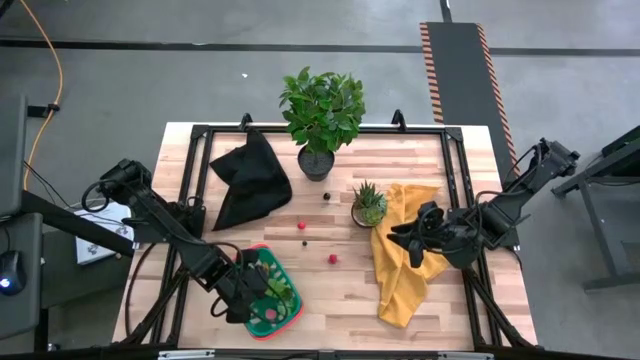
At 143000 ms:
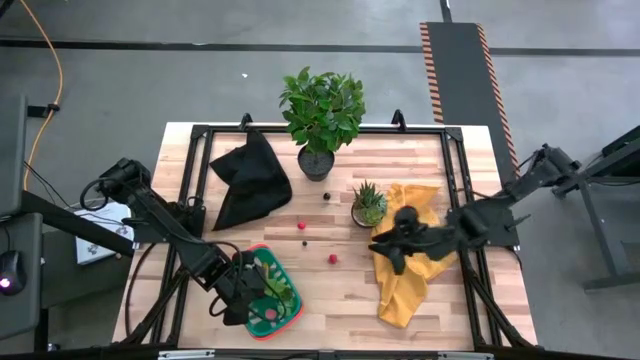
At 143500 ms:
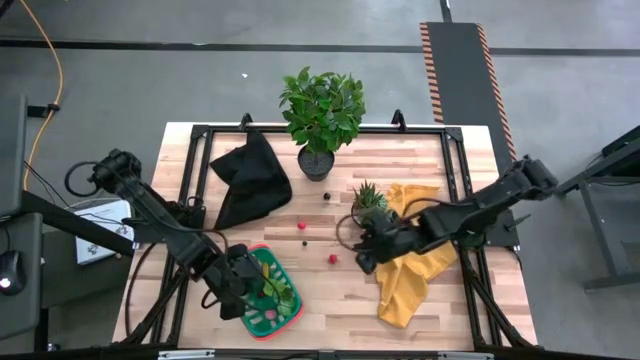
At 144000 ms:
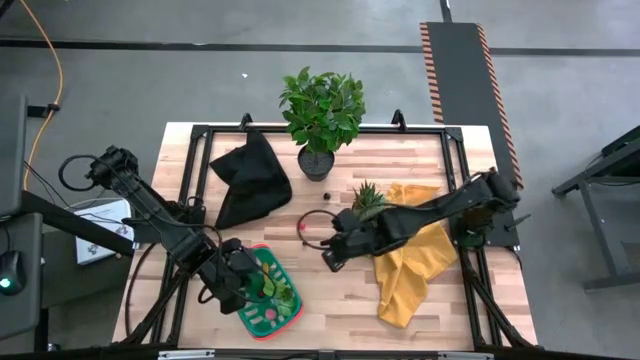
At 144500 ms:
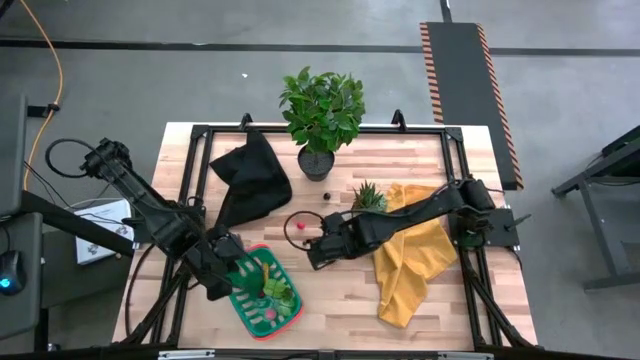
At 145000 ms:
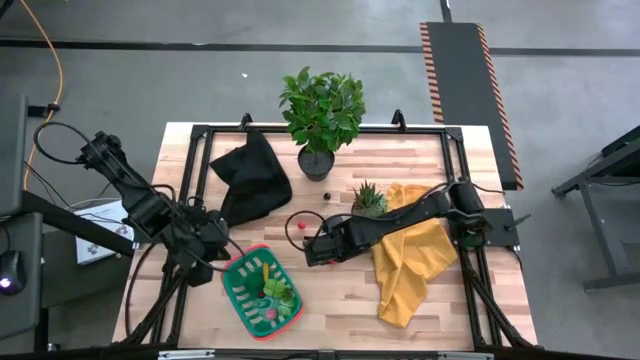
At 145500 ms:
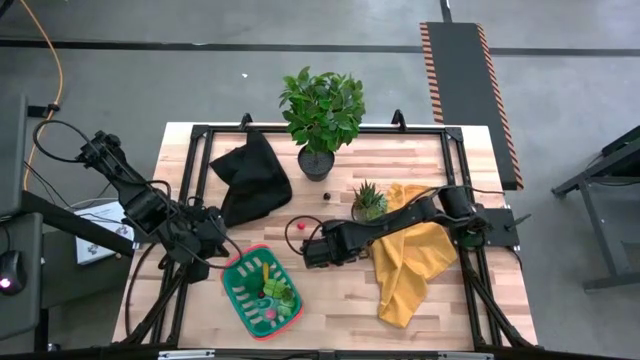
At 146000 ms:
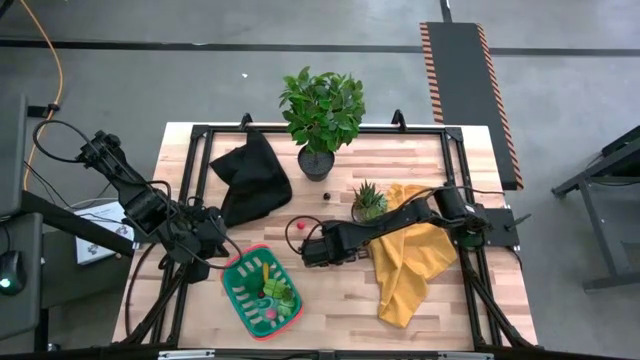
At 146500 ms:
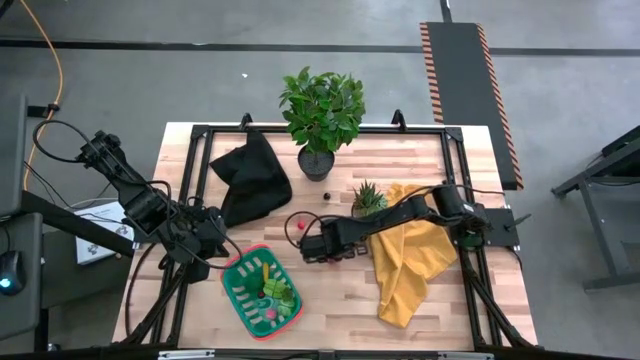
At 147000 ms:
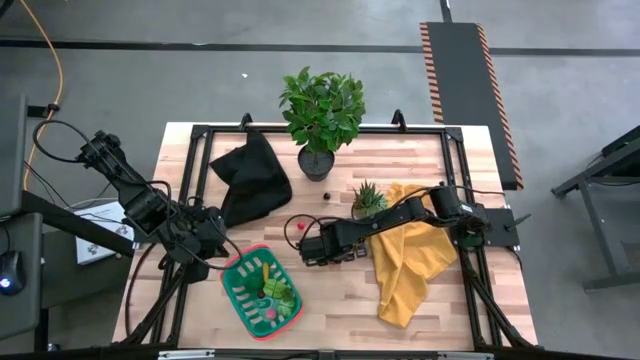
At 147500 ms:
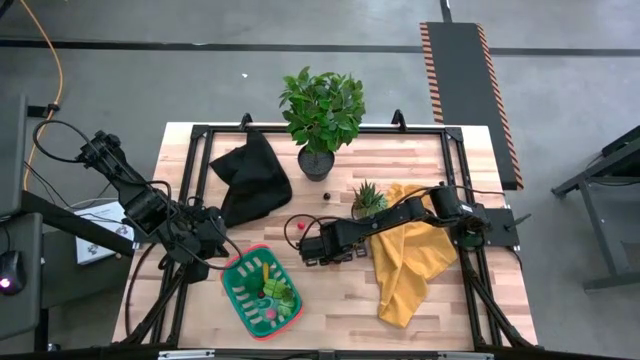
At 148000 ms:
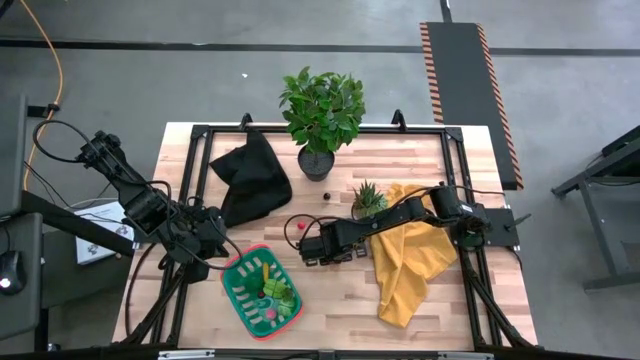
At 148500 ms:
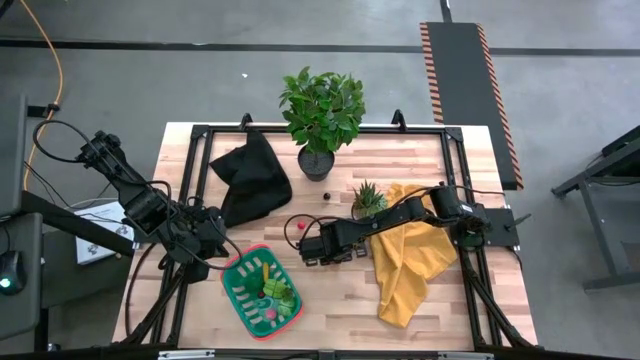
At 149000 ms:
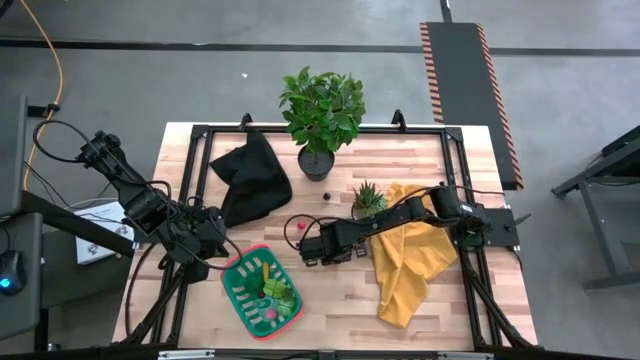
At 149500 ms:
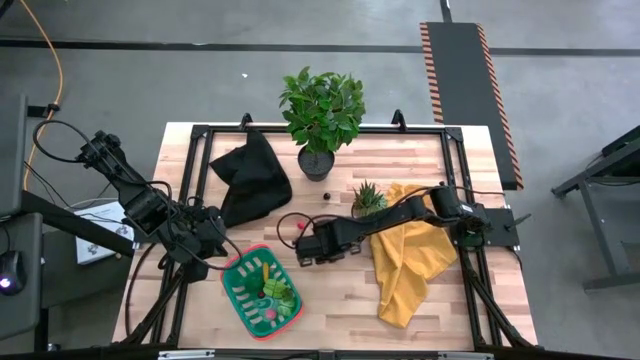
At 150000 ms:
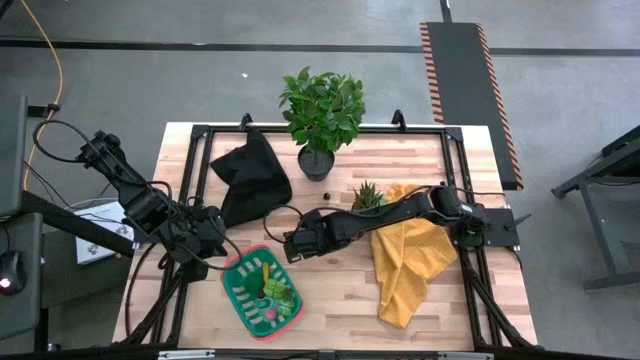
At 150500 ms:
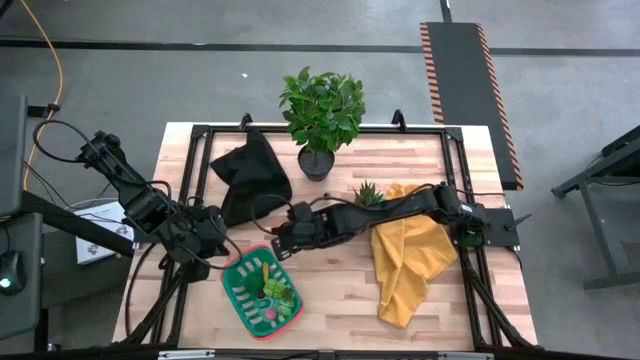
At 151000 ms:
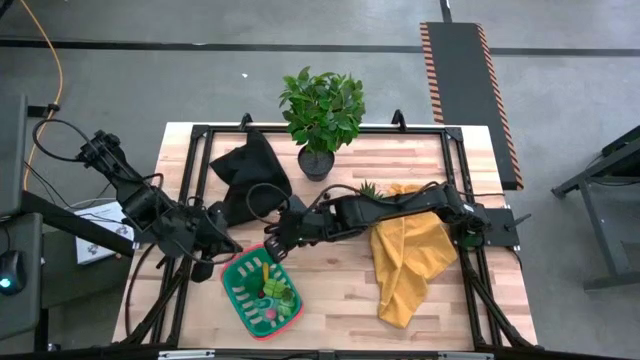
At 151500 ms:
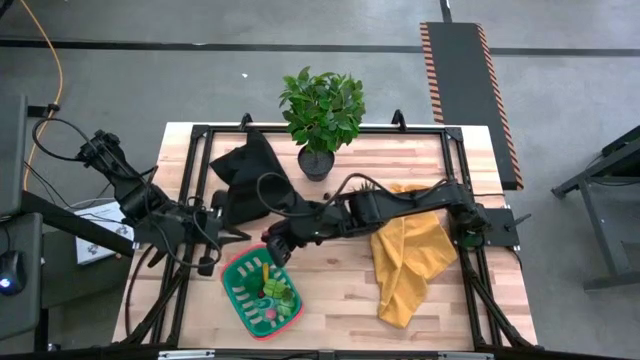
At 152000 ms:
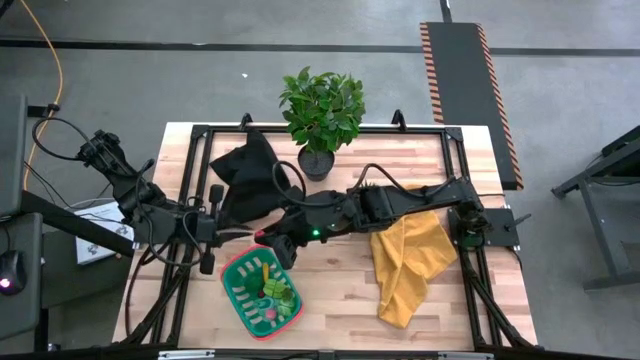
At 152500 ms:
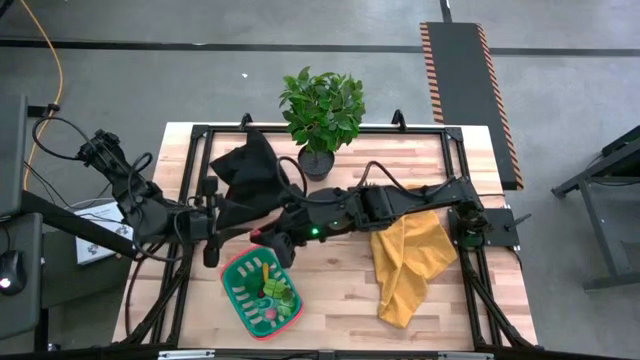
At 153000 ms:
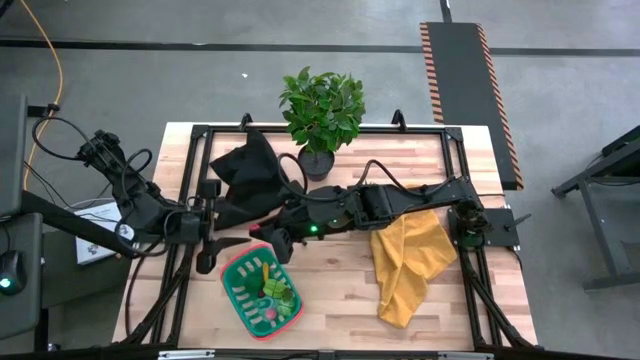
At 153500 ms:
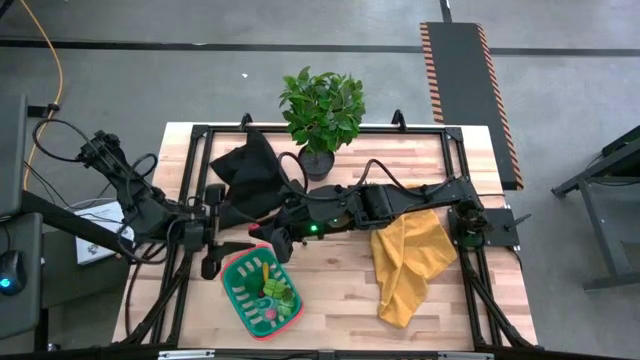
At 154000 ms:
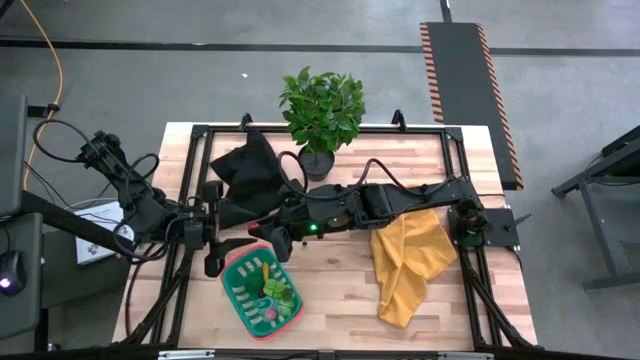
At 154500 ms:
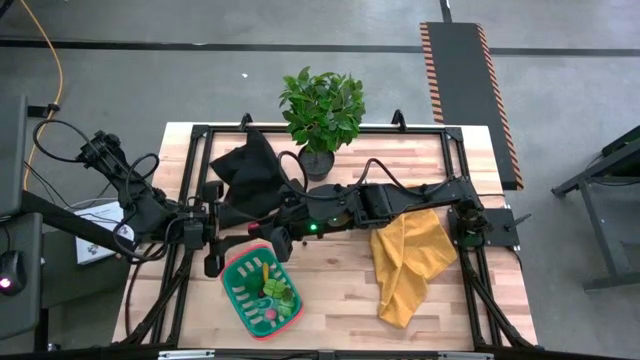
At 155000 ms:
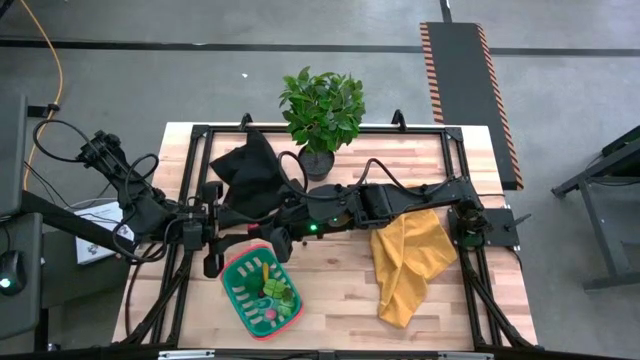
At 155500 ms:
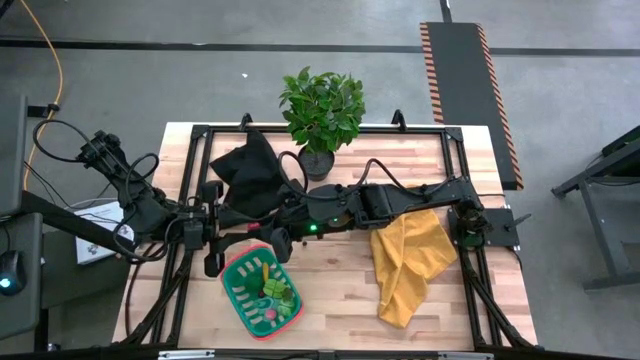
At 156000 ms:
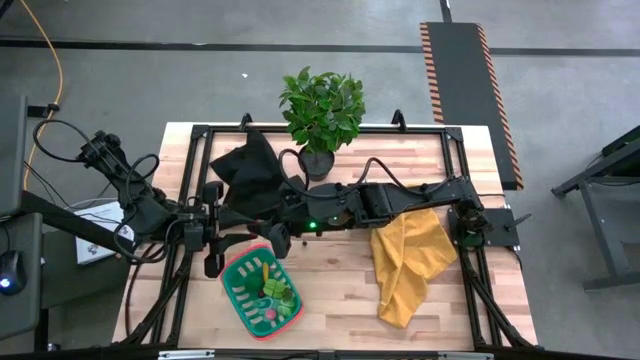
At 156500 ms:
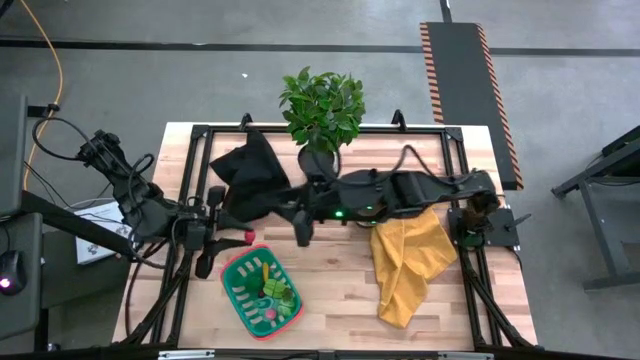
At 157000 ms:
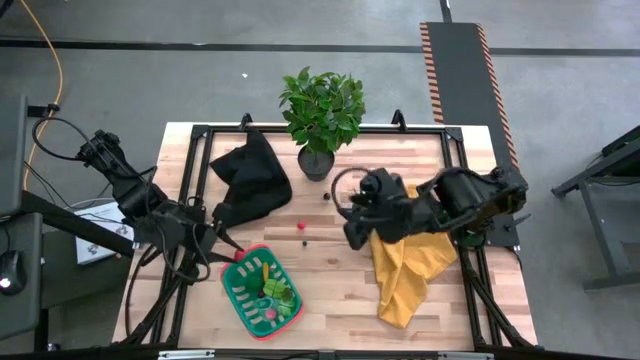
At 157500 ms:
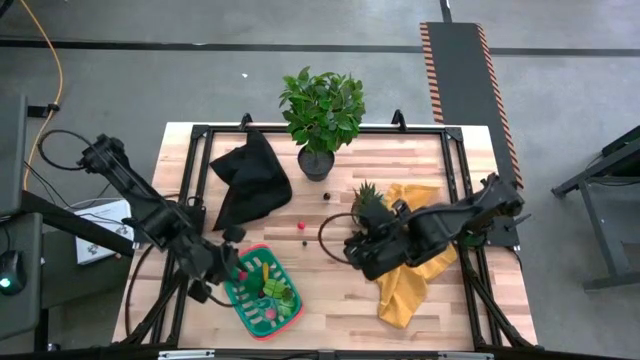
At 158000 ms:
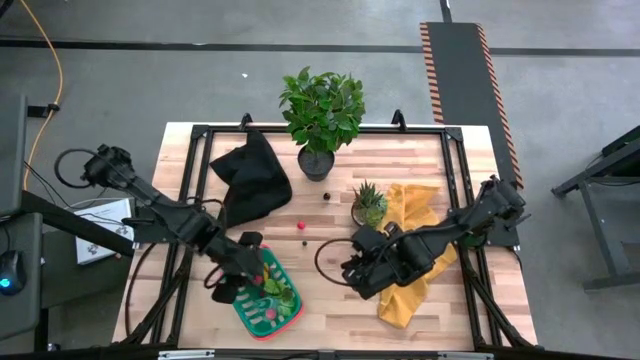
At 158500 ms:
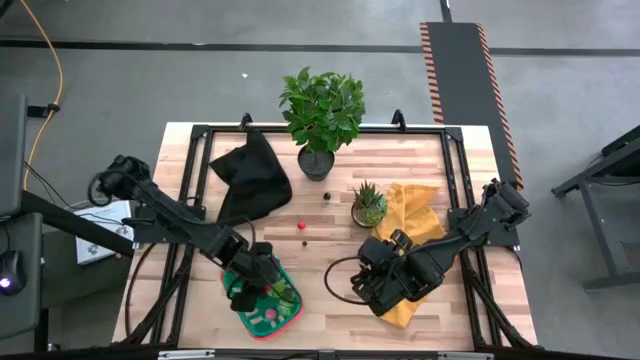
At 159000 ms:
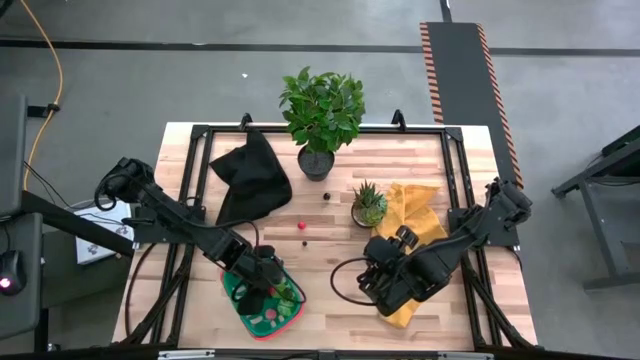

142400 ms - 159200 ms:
Task: Pick and placing Produce into tupperware
Put the red raspberry into the blue basket

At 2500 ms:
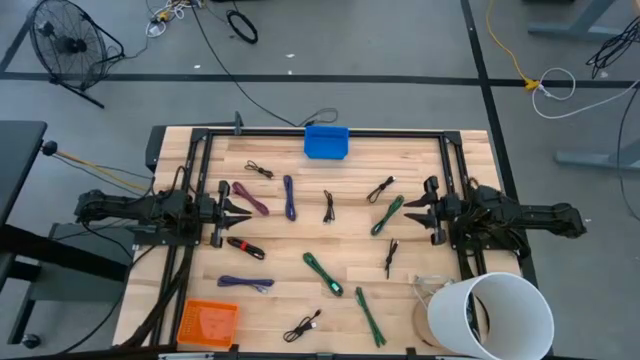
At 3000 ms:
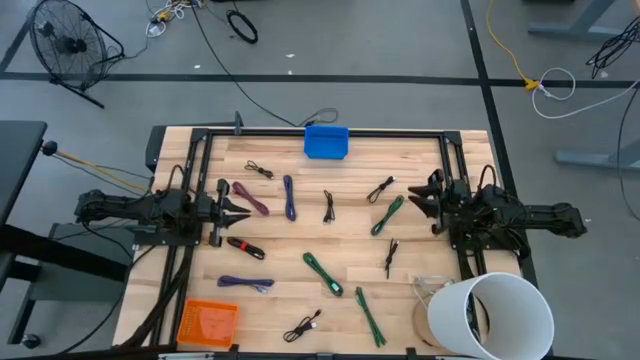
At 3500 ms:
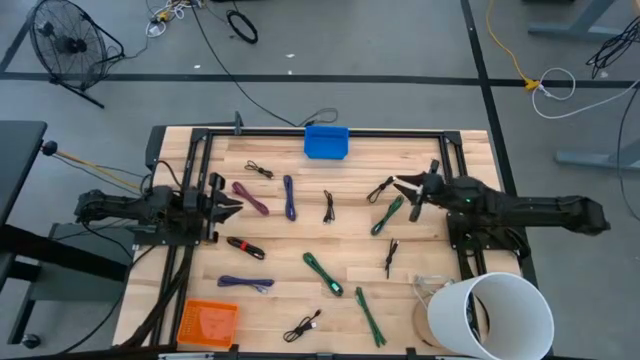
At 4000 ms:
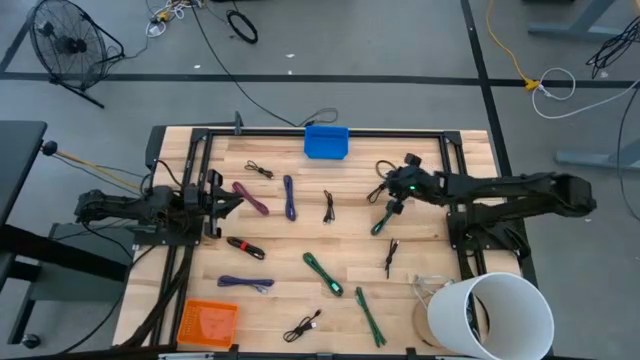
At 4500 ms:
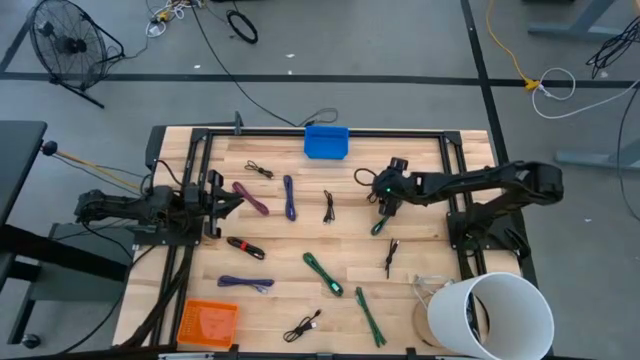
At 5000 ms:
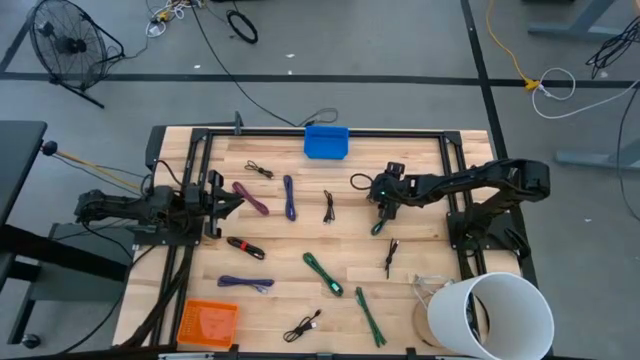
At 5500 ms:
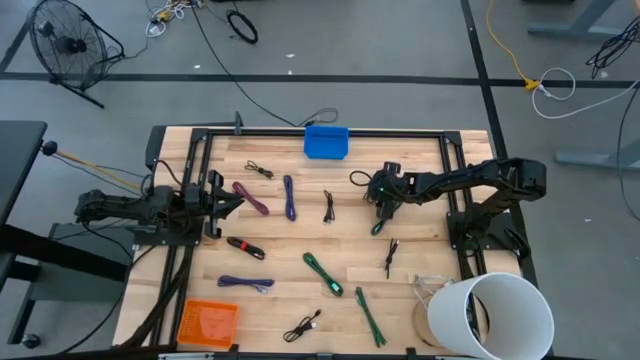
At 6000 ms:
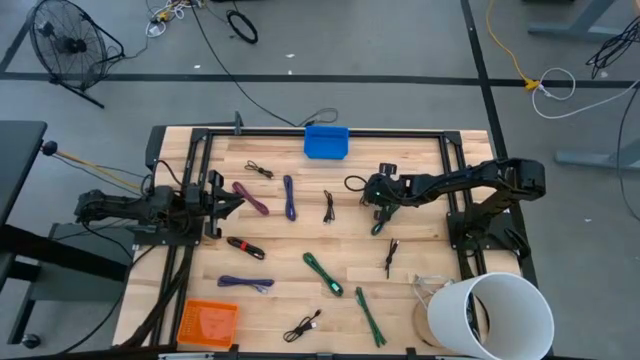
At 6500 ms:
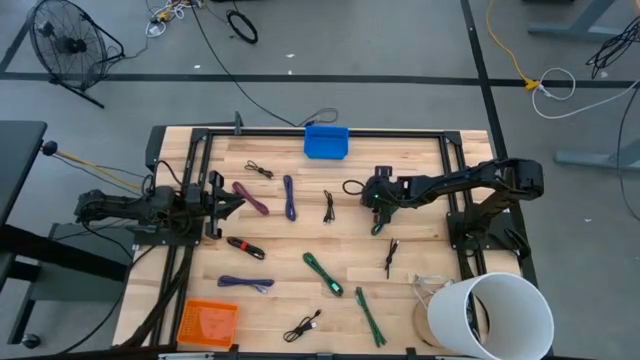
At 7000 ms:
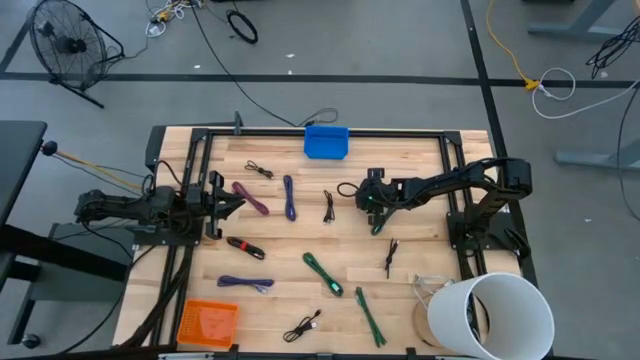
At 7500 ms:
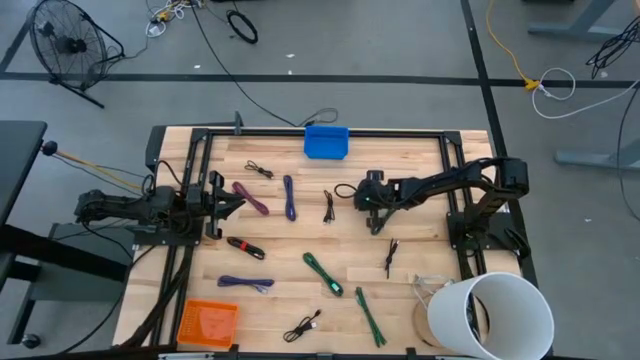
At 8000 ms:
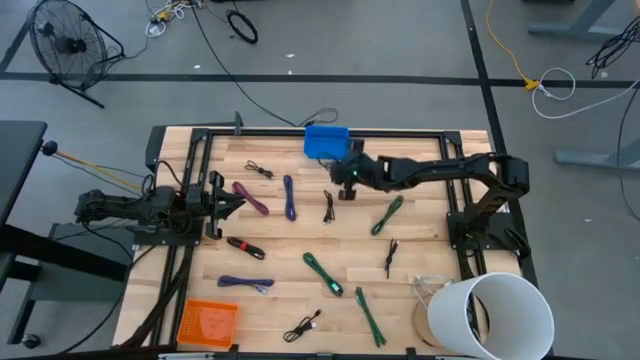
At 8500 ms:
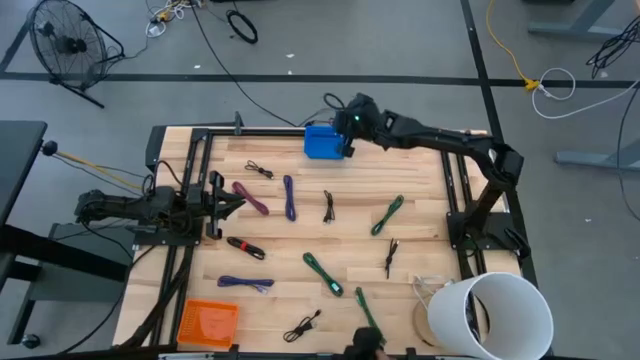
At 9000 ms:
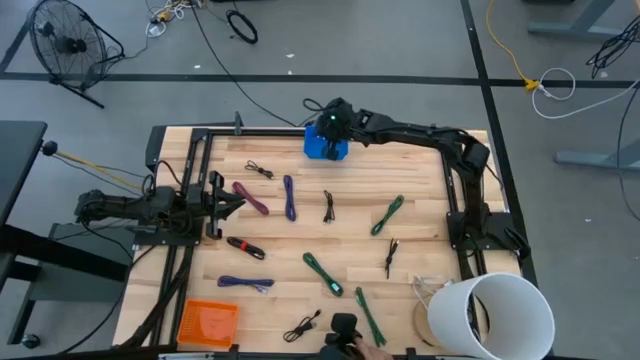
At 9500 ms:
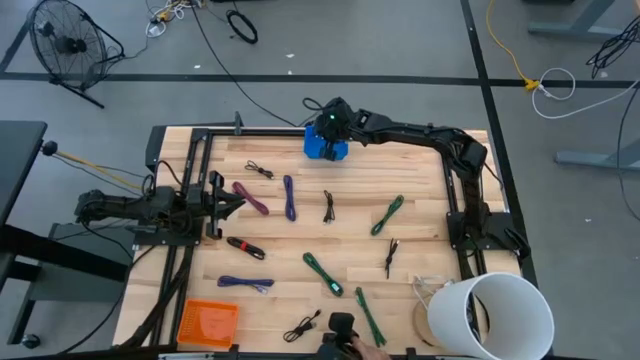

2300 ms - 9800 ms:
Task: Pick & Place USB Port
Put the black charger cable into the blue bin
